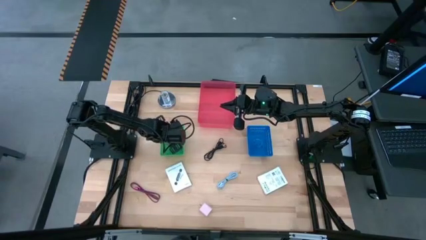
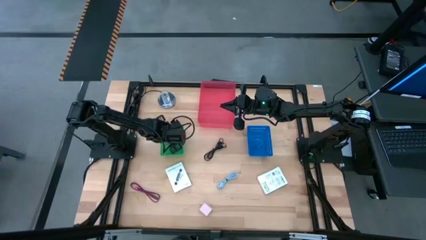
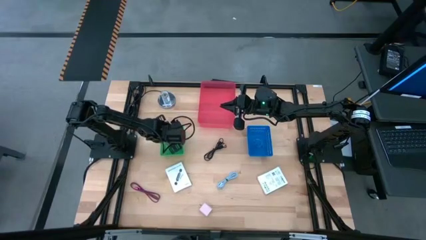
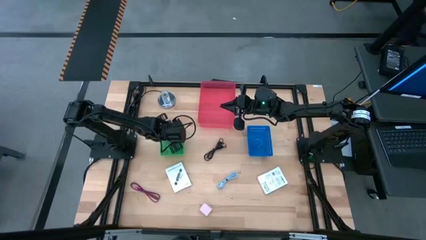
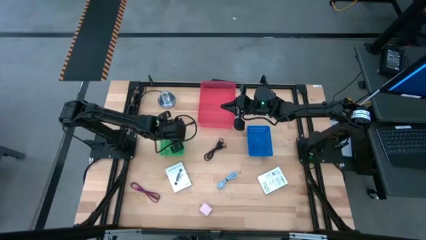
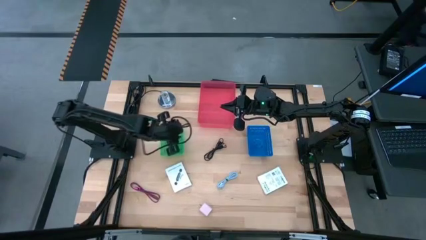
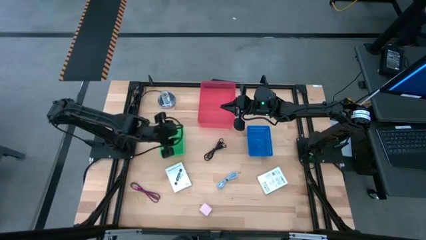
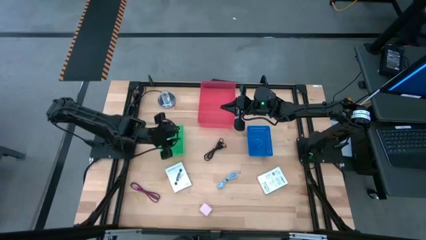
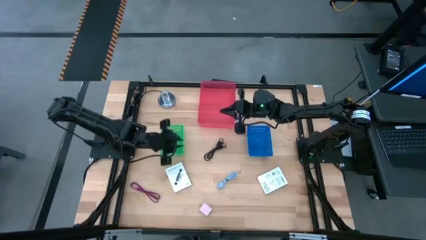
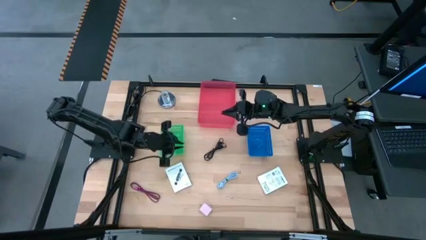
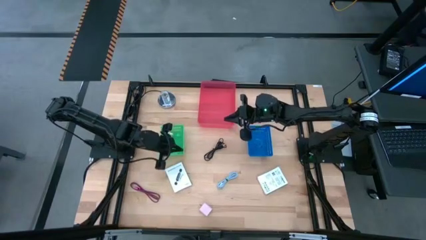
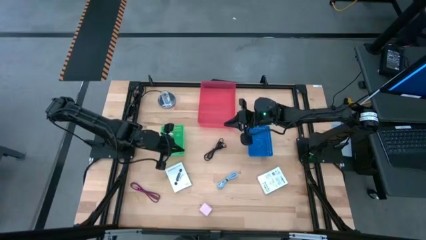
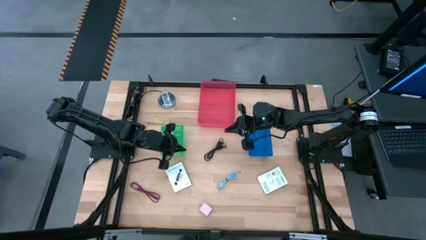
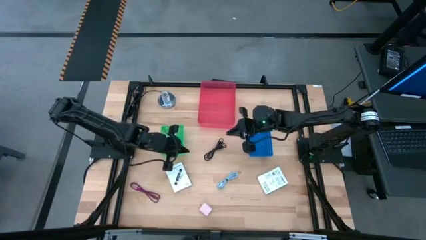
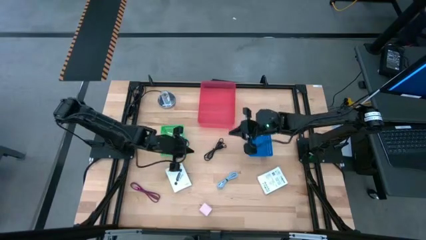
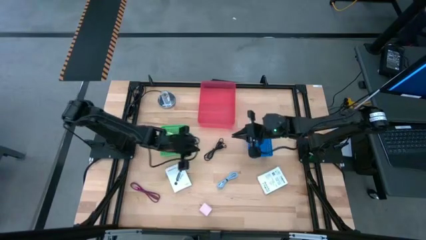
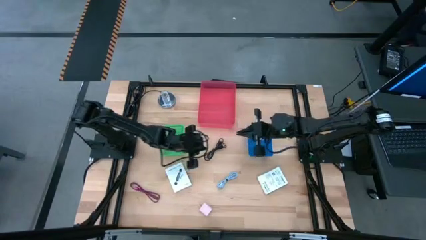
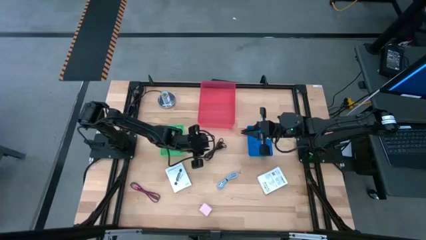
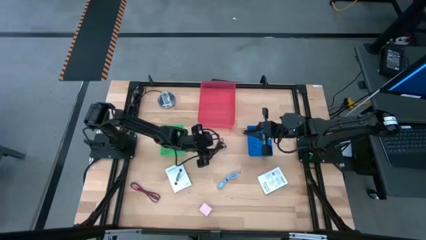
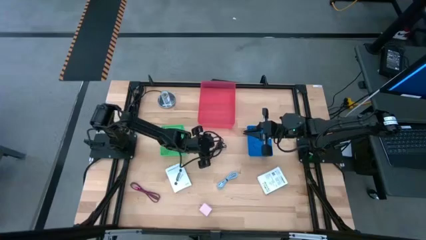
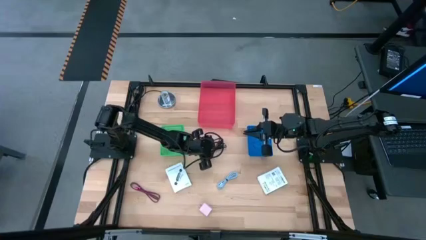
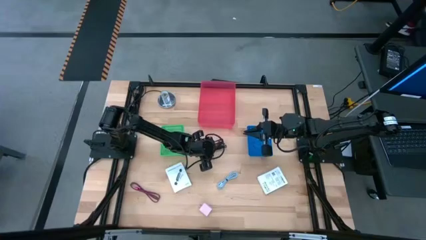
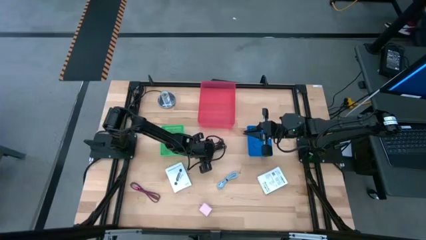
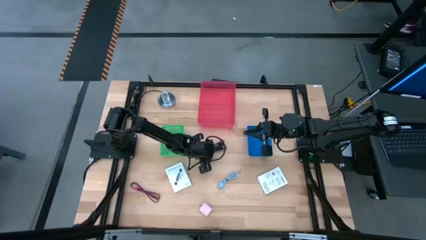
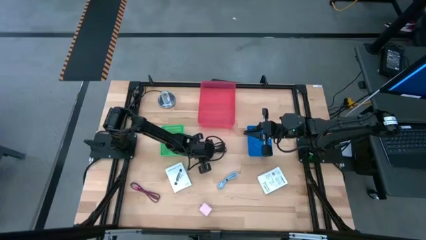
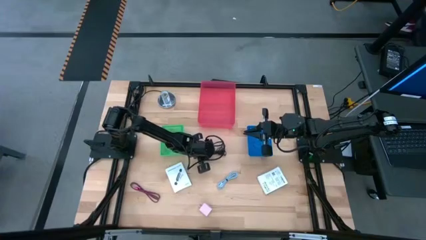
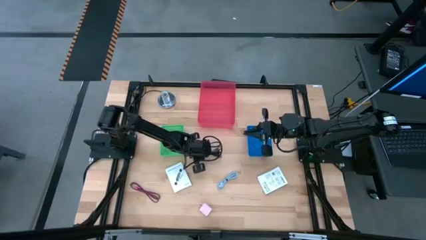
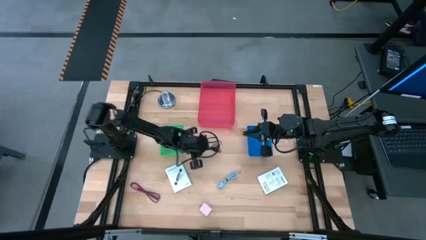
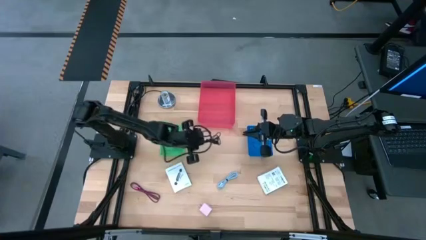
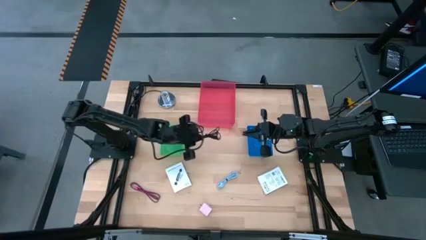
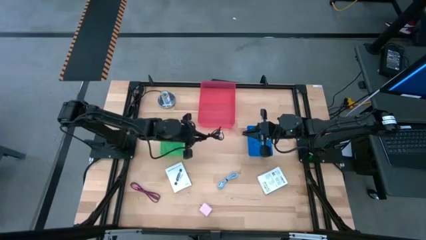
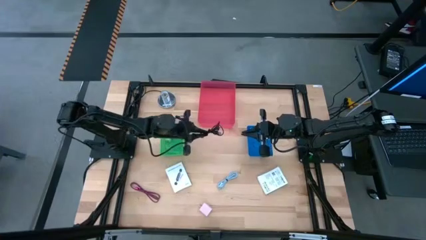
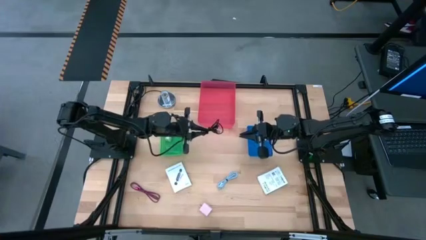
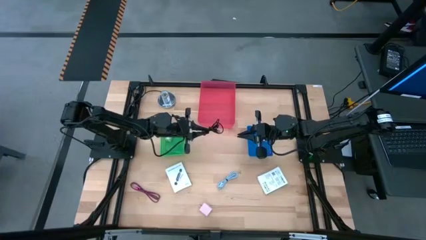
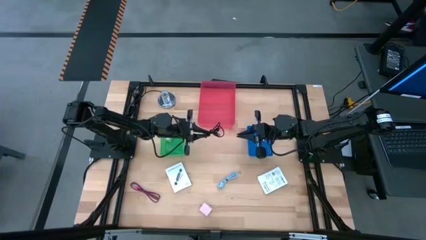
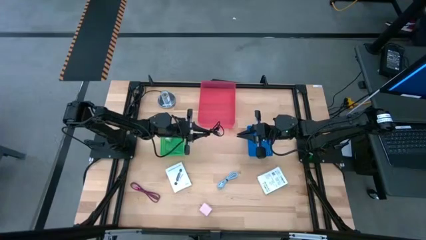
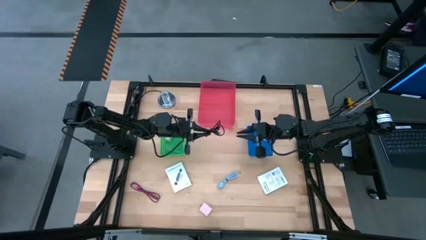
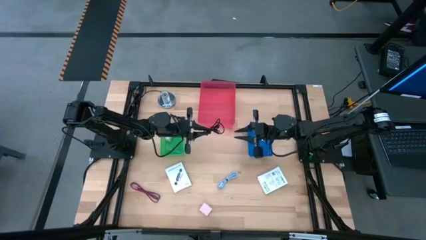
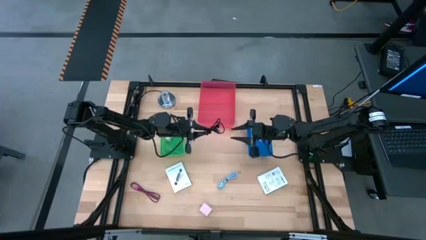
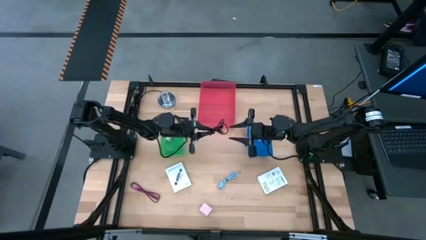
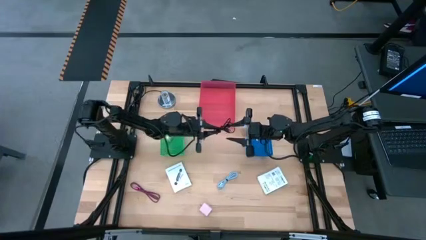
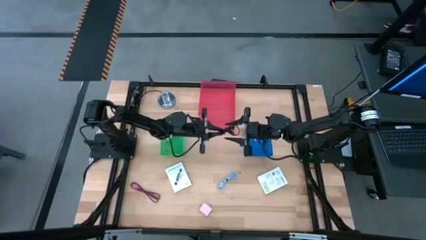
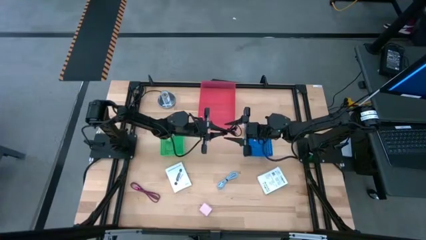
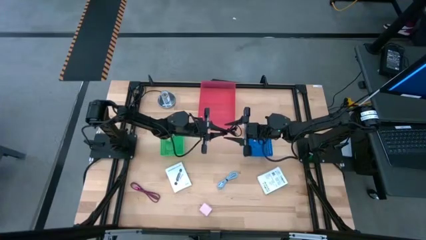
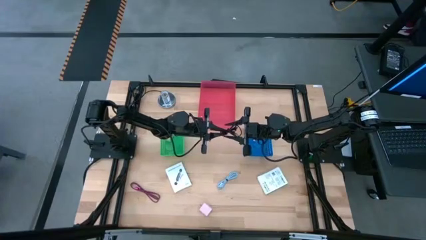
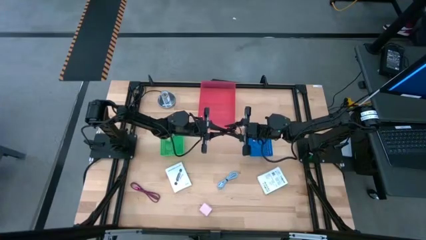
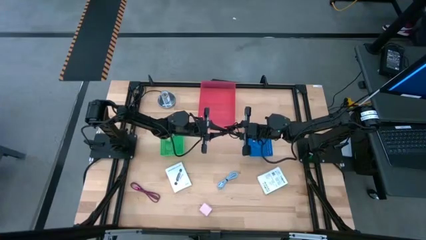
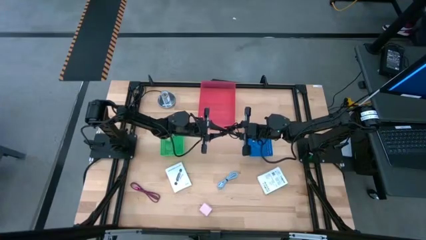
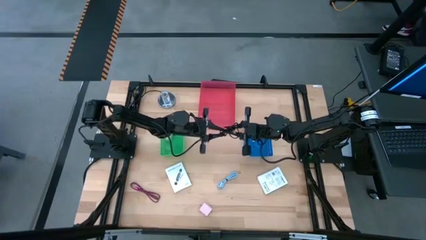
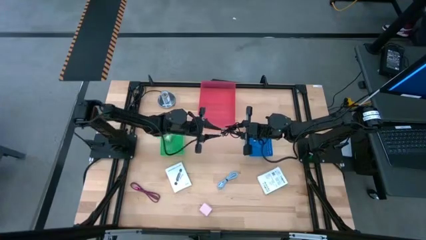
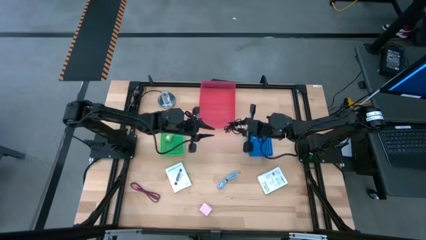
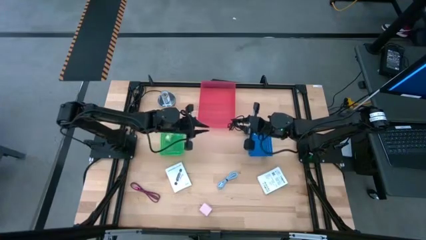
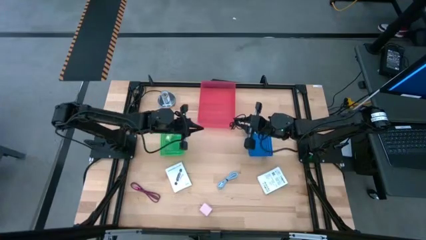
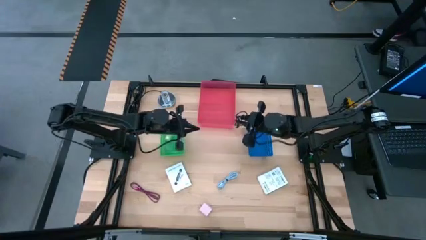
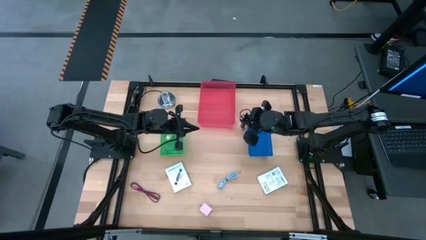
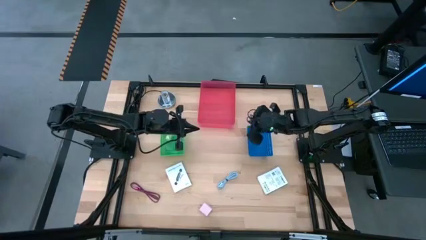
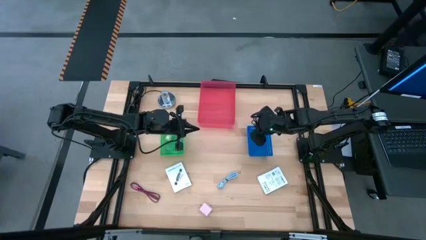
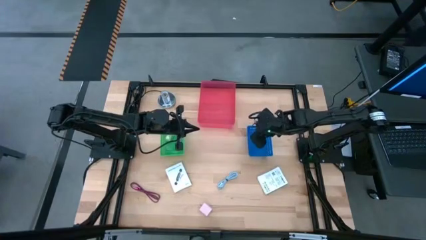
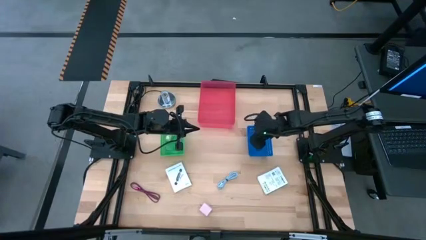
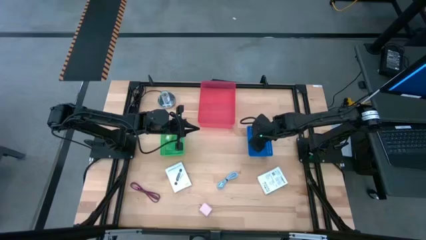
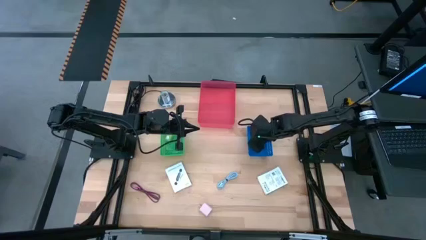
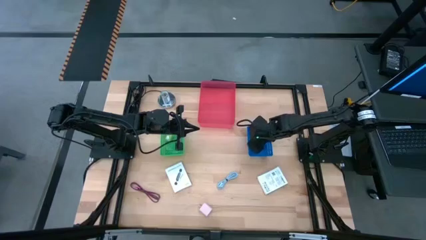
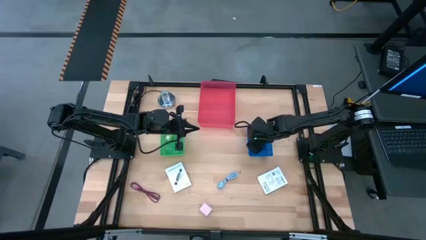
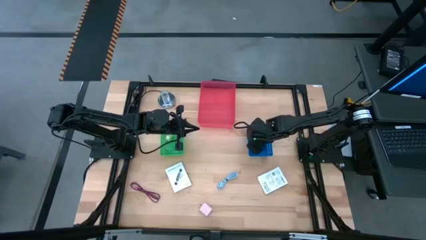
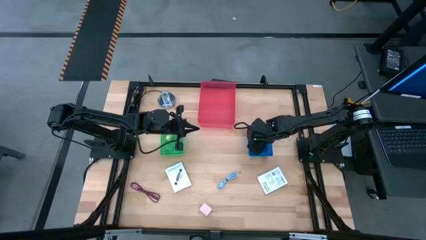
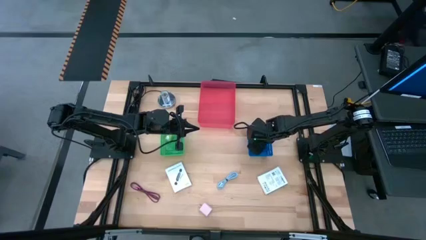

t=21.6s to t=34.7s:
Task: Pick and place items into bin
Put the black charger cable into the blue basket
